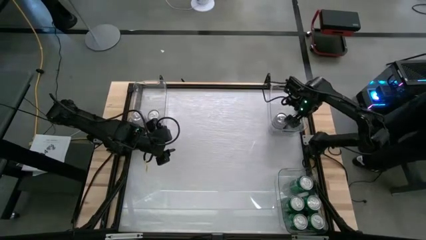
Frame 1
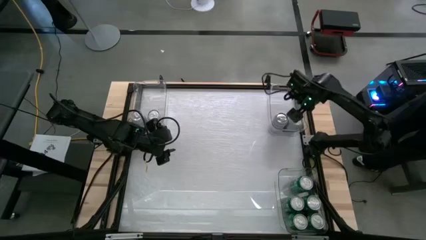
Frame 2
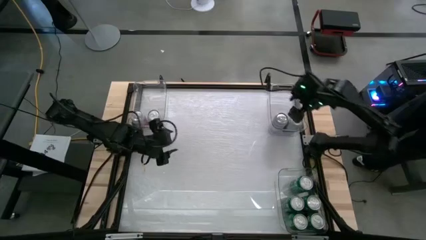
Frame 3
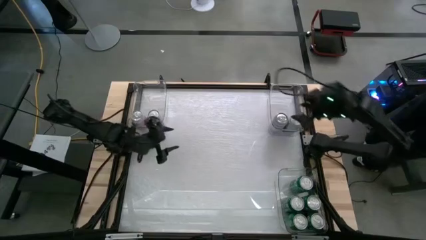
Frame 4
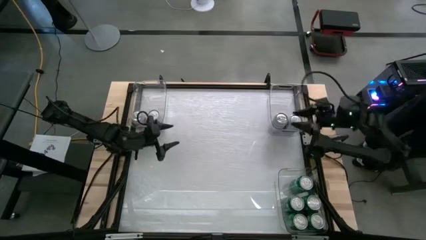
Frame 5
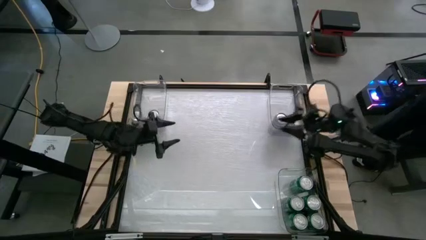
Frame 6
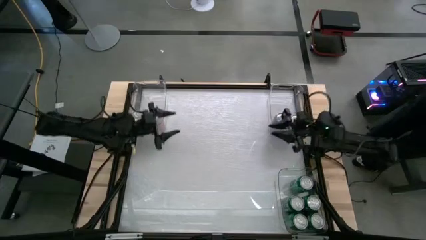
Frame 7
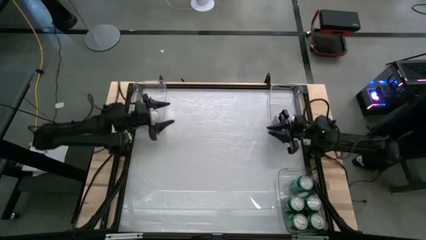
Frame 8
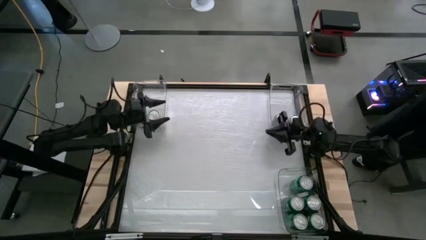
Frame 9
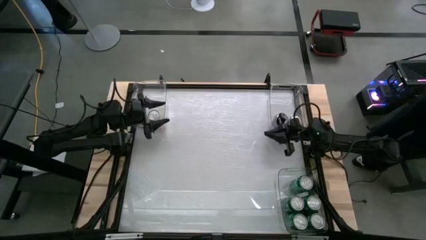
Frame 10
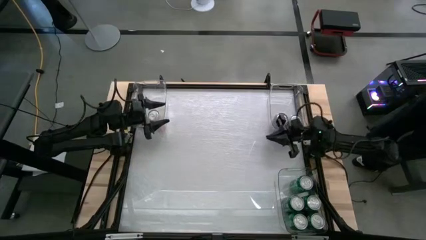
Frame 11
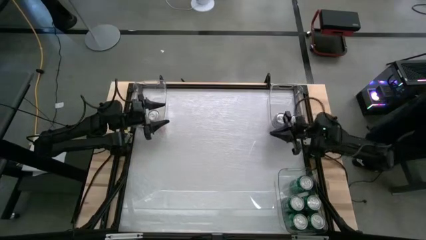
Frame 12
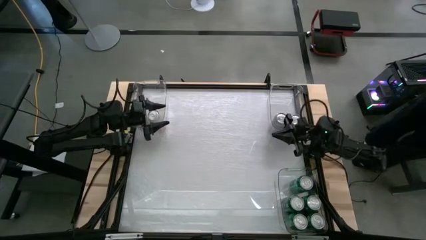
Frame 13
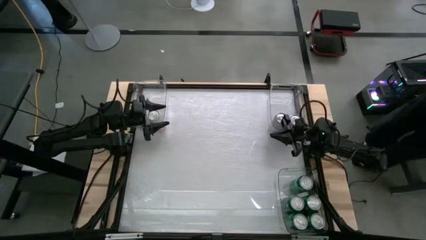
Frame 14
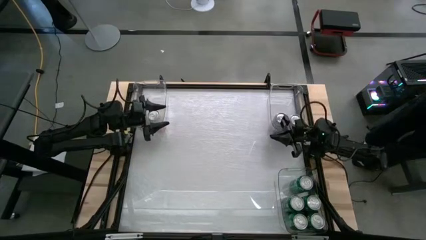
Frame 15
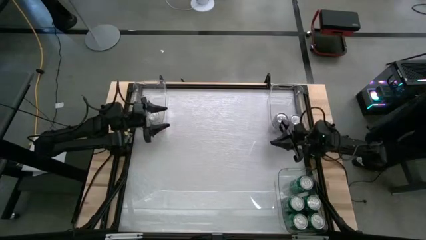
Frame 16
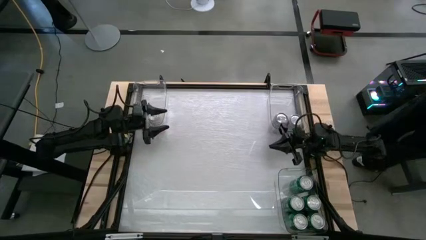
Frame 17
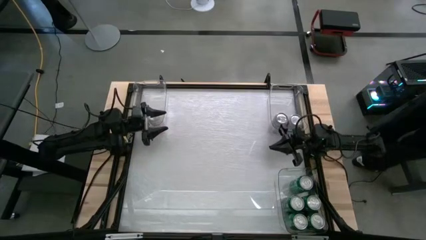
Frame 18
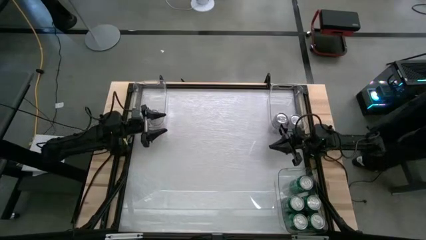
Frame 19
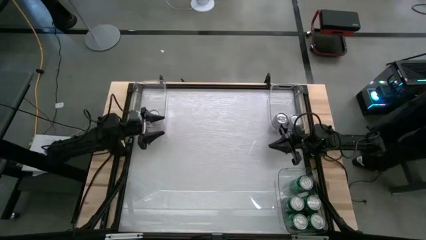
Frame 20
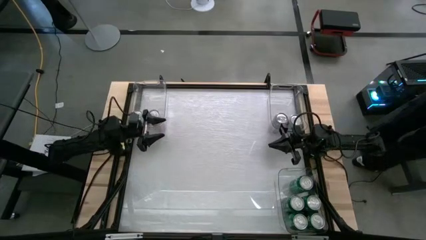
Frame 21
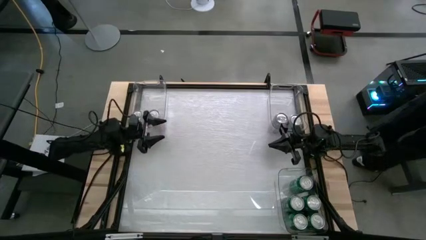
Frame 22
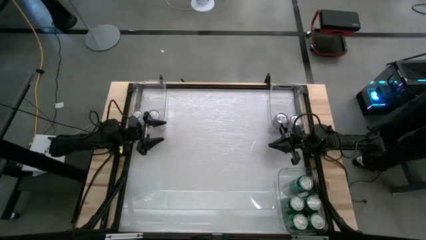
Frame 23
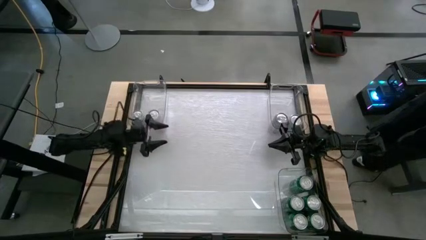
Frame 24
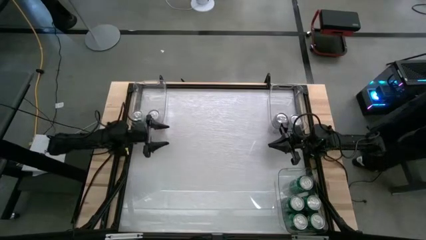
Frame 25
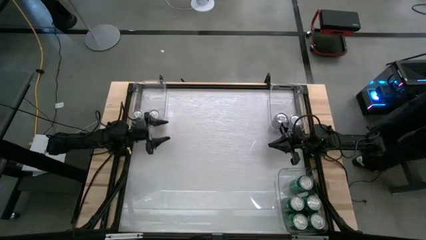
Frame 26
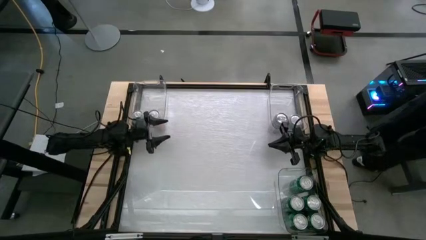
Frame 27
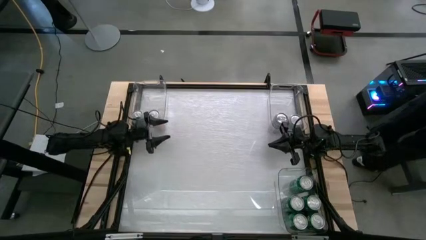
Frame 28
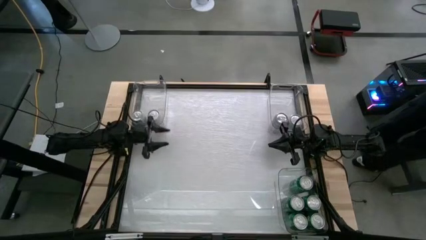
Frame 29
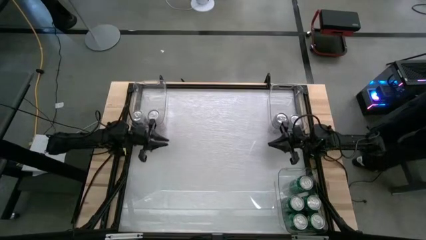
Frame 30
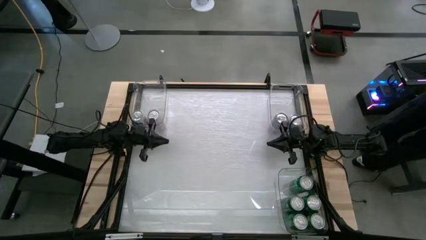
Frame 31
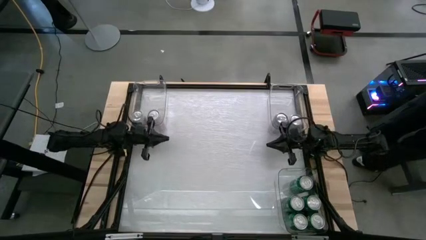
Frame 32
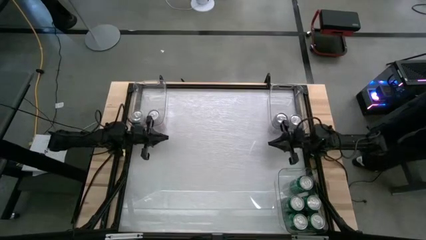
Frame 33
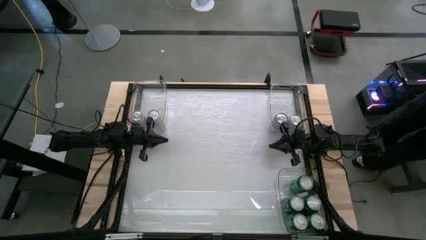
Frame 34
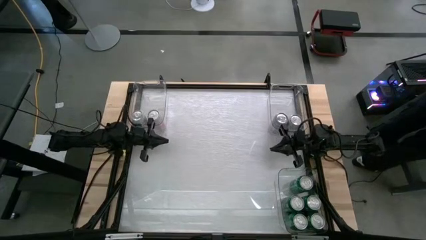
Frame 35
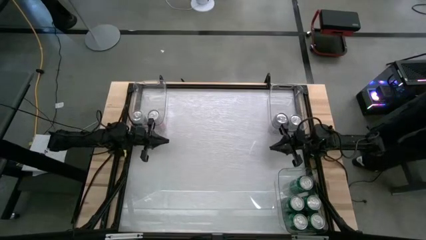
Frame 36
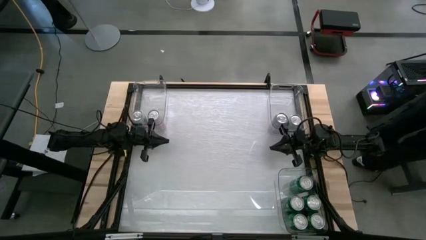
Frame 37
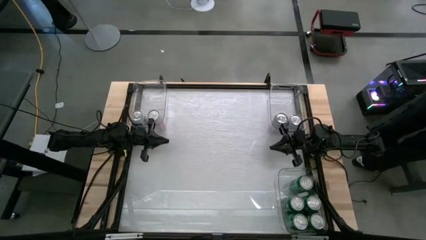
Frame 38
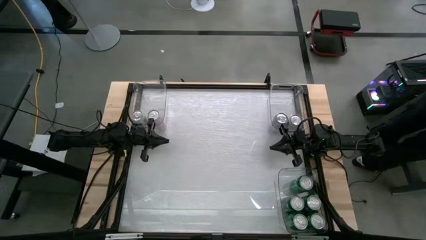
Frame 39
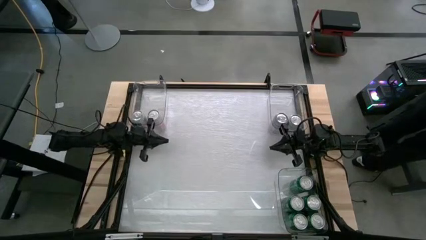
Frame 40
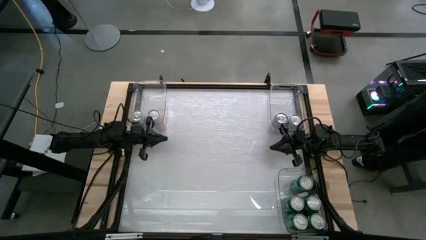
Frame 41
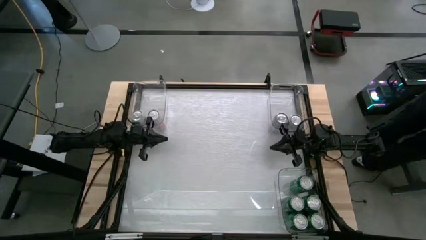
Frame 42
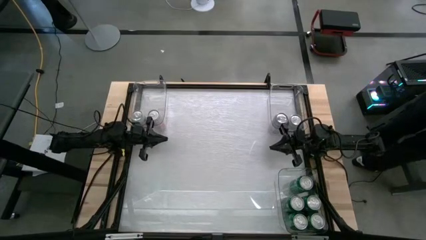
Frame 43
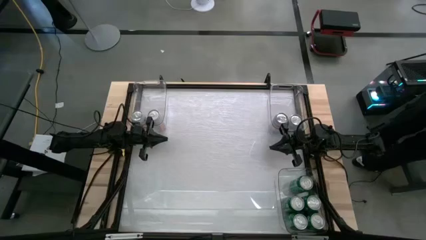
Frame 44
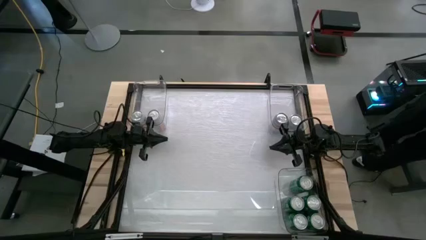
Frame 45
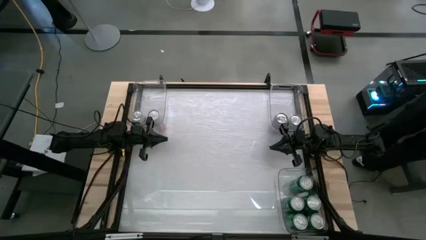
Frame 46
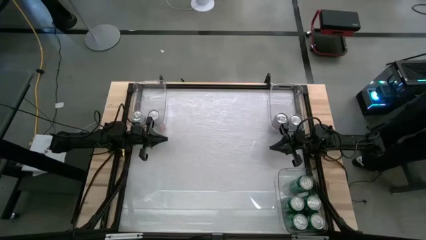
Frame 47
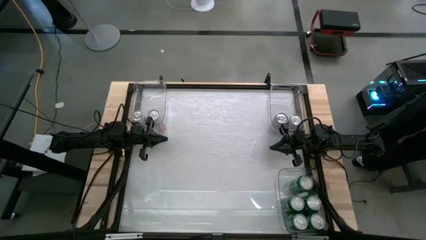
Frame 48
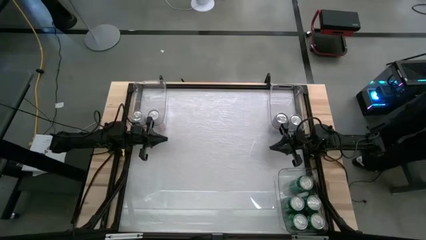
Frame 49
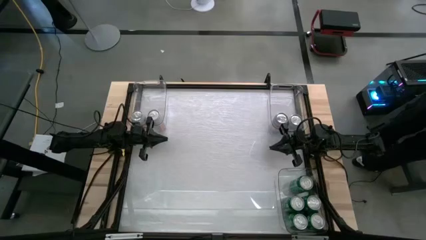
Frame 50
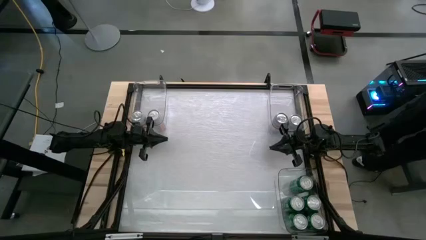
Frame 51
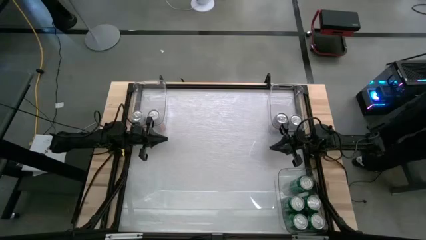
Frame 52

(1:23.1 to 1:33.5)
Task: Sort soda cans
Return to Home Position

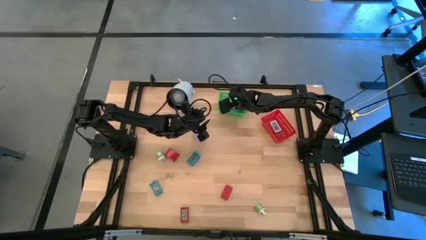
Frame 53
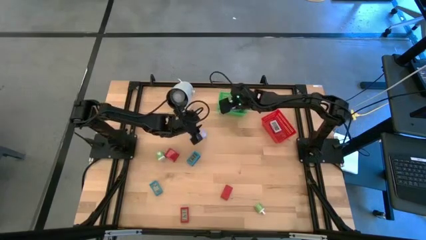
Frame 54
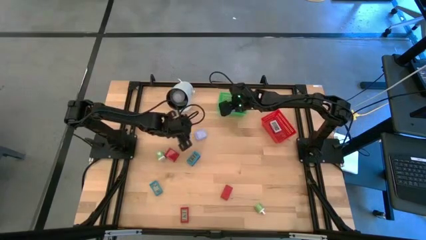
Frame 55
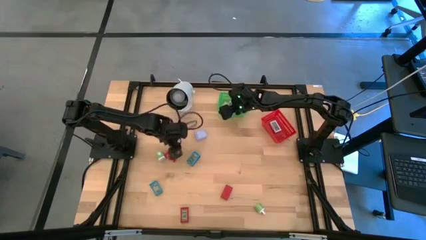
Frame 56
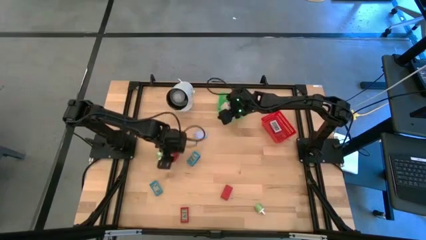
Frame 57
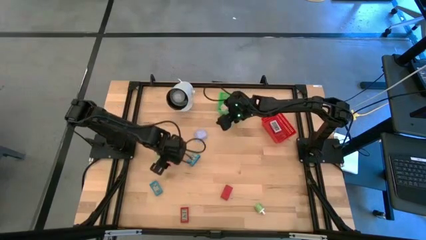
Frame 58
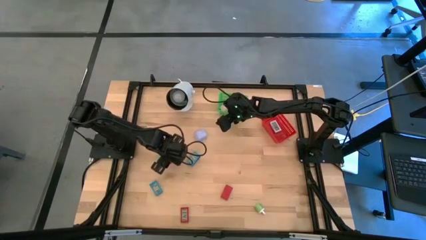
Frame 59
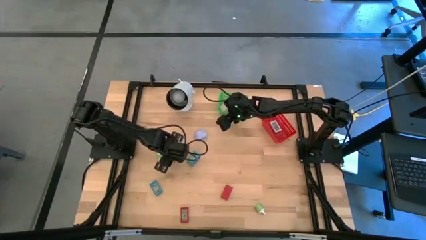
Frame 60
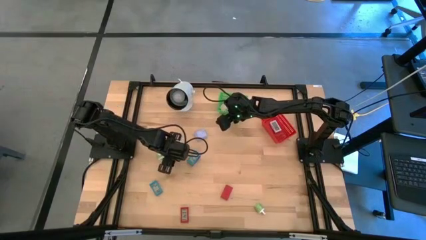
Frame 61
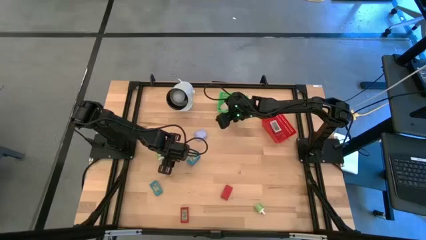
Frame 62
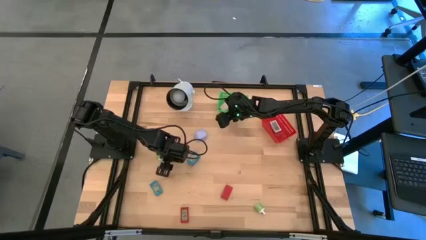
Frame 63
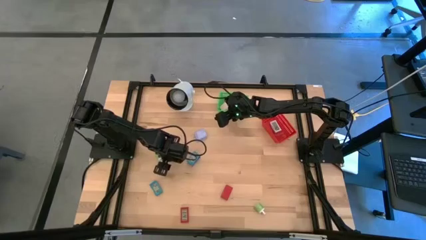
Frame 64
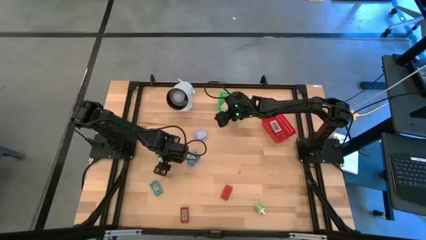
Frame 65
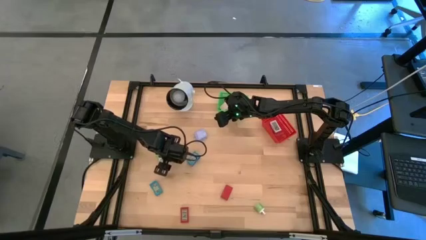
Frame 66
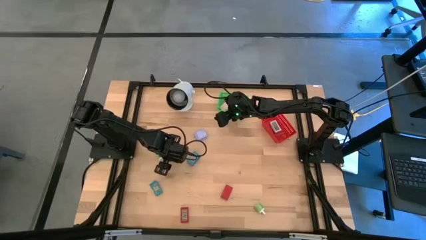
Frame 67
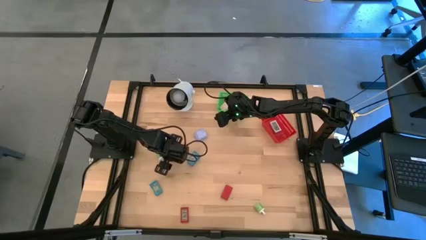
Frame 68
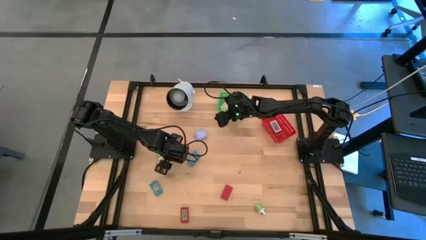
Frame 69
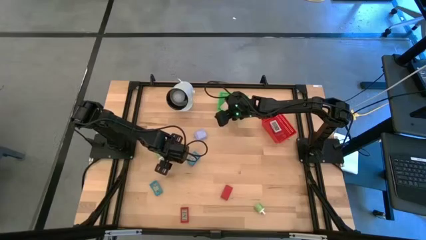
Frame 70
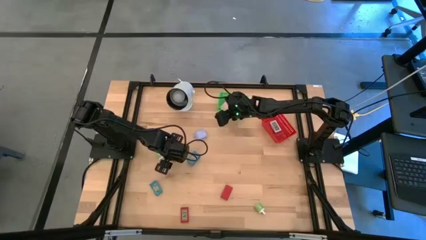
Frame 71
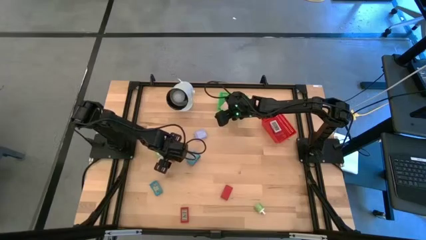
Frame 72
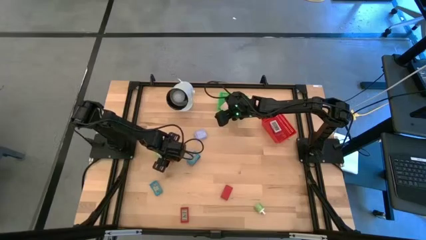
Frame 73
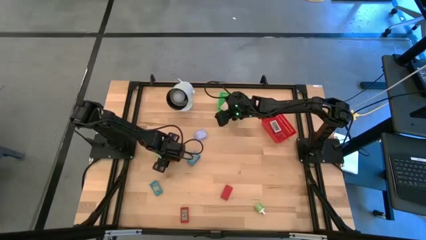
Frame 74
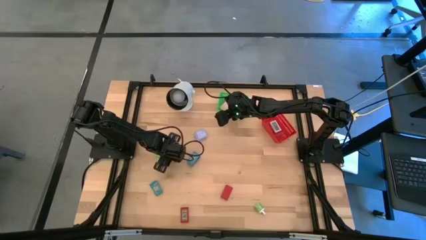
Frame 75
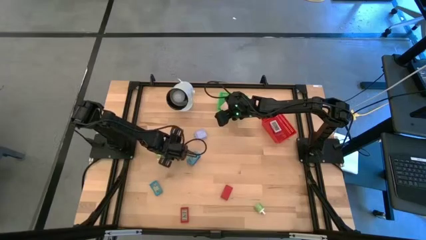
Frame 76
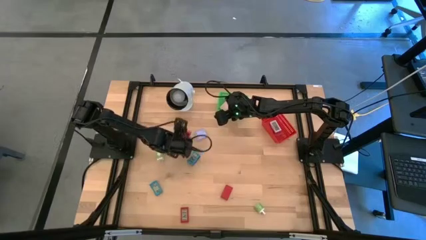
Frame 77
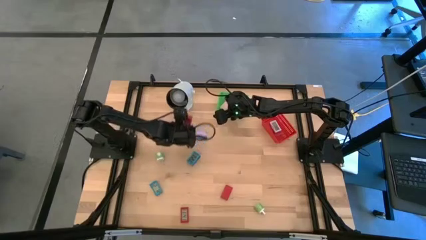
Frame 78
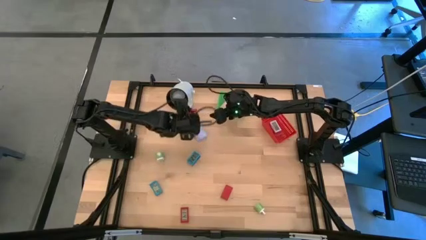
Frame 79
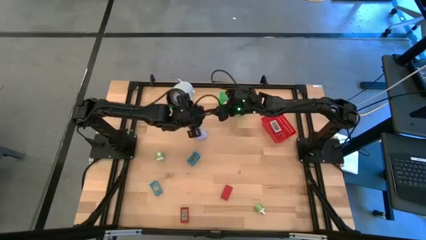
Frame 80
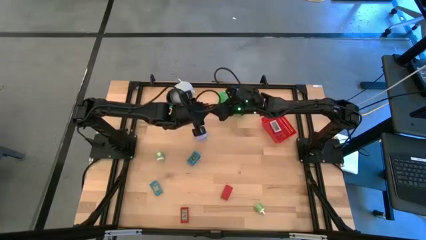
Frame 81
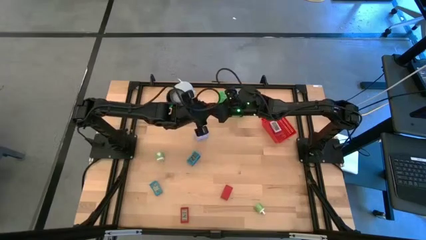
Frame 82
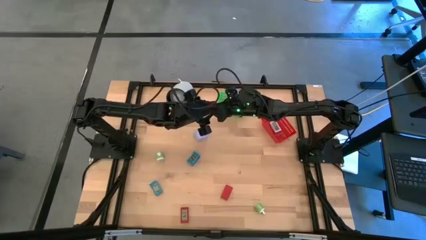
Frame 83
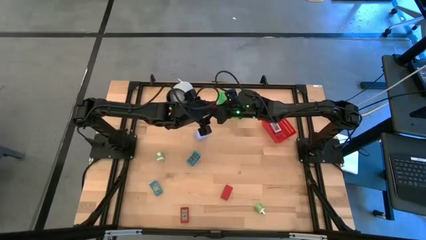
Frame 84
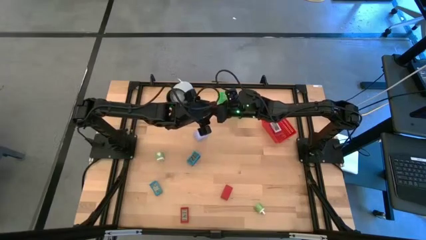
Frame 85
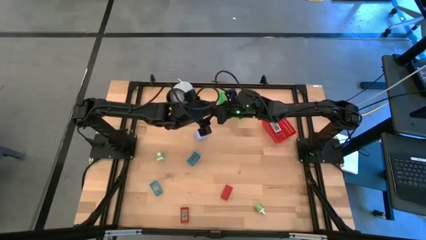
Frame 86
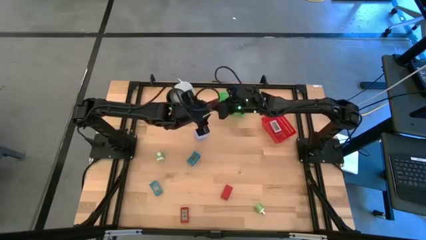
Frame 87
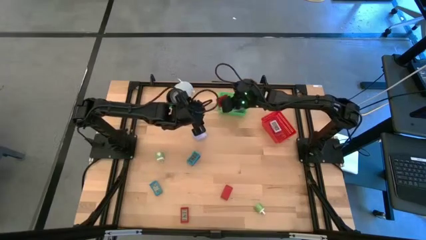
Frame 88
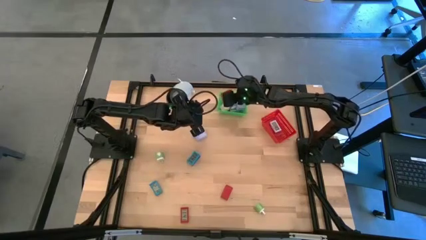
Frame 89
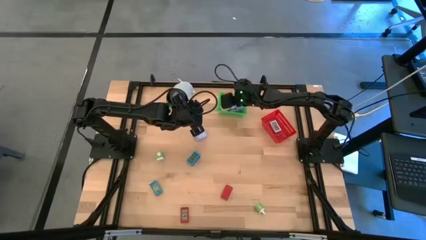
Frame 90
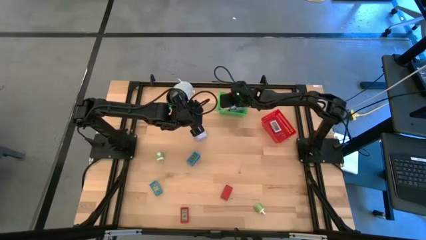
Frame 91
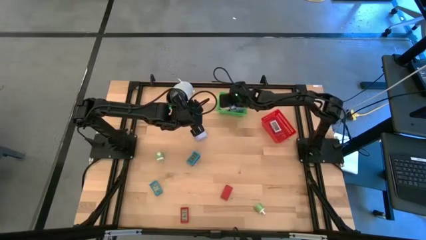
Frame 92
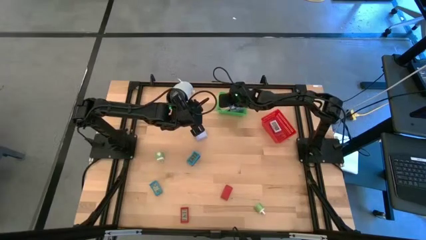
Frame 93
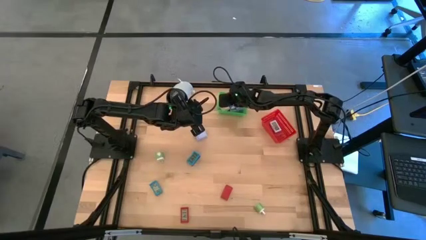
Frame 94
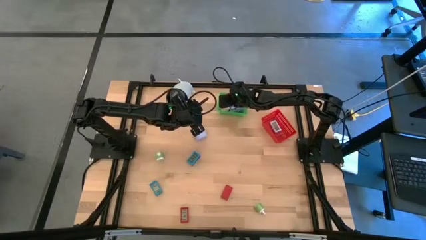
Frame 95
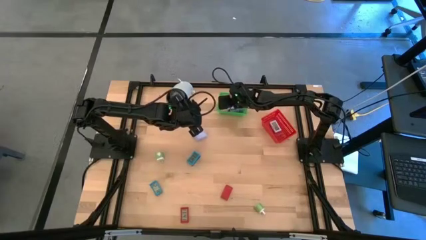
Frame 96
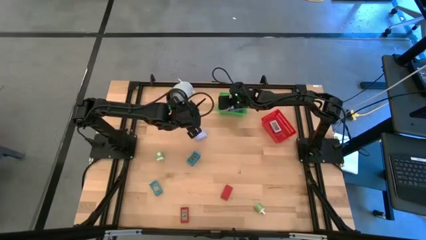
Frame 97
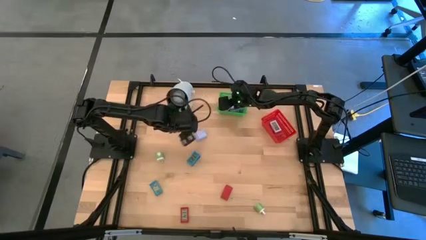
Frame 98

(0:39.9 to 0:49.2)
Task: Pick & Place Office items
Put the red charger adapter into the green bin
